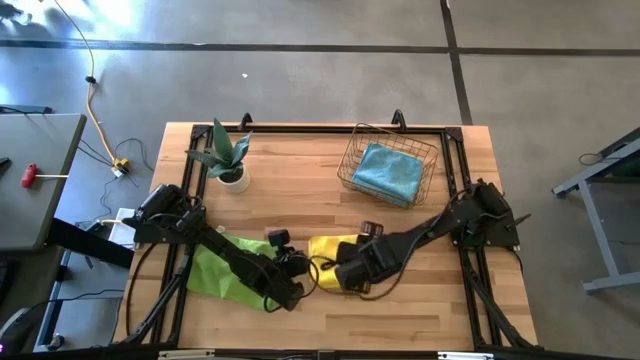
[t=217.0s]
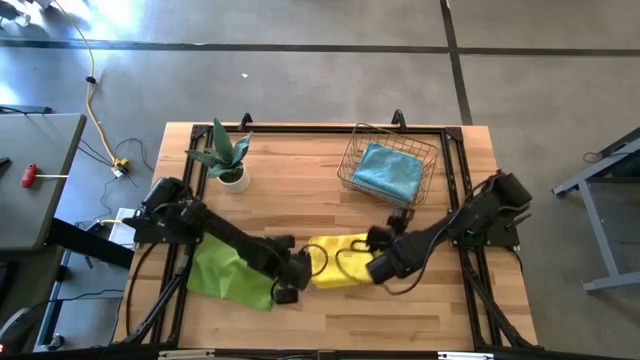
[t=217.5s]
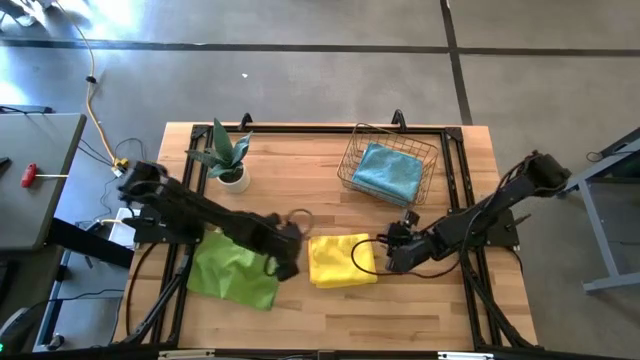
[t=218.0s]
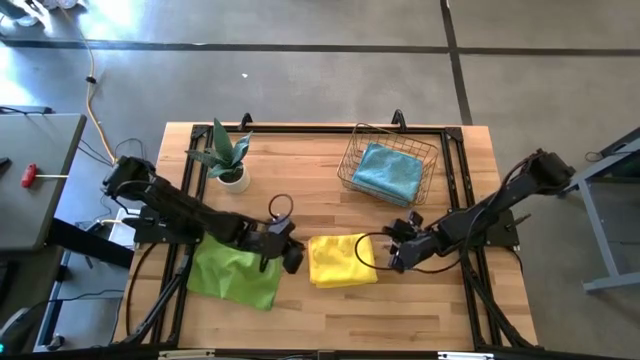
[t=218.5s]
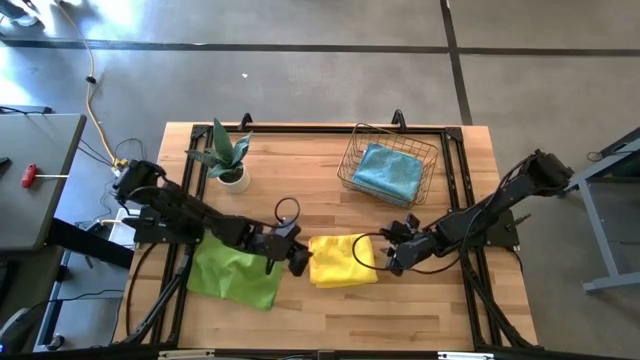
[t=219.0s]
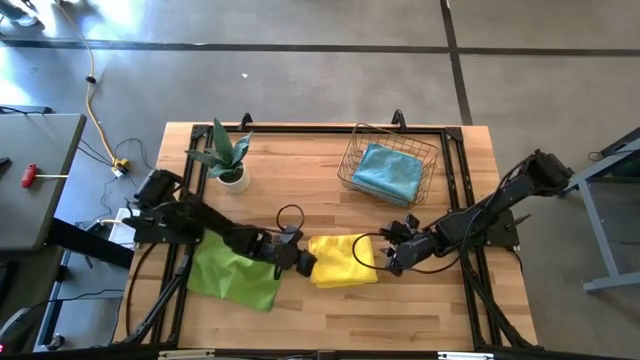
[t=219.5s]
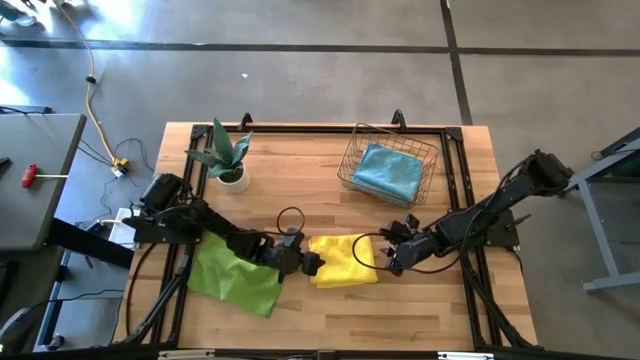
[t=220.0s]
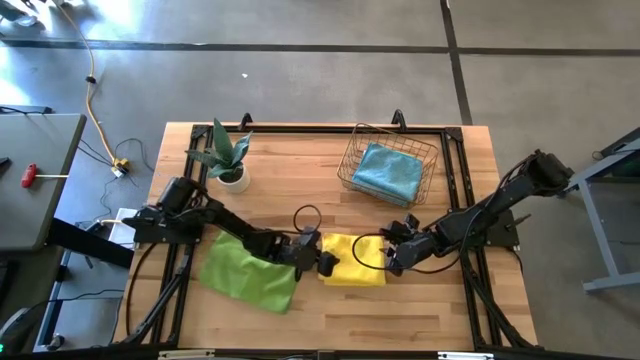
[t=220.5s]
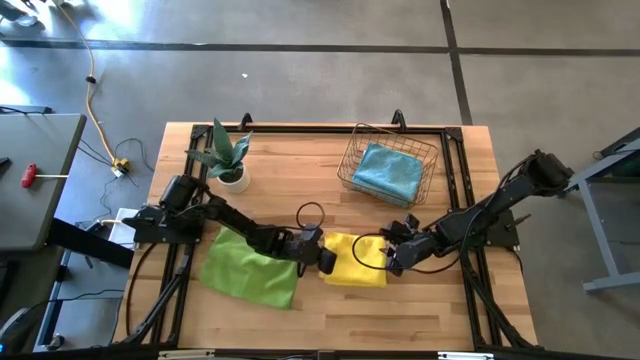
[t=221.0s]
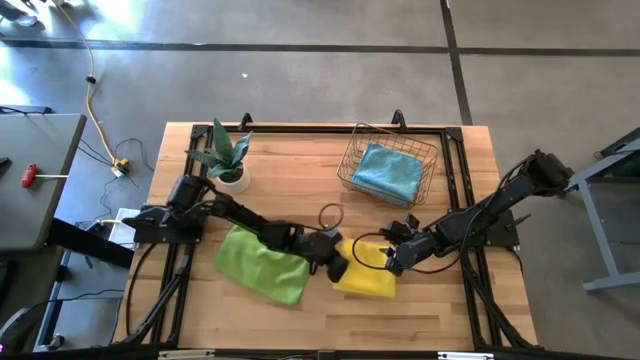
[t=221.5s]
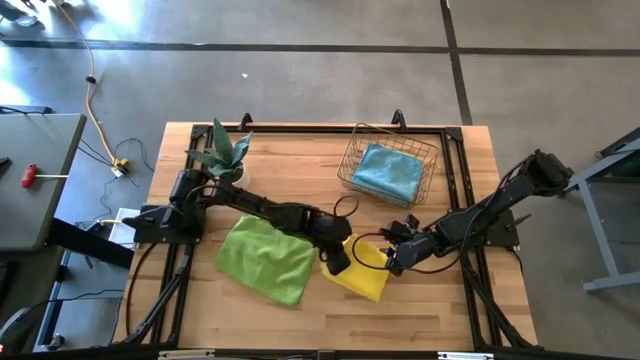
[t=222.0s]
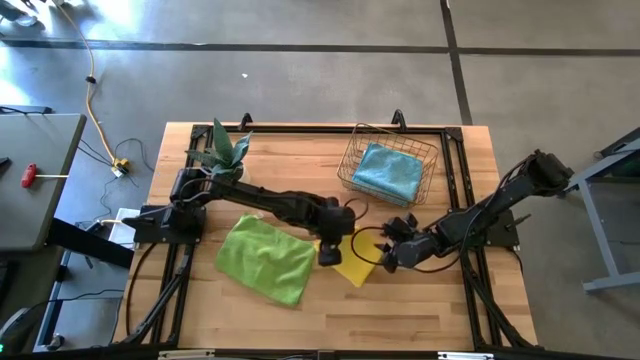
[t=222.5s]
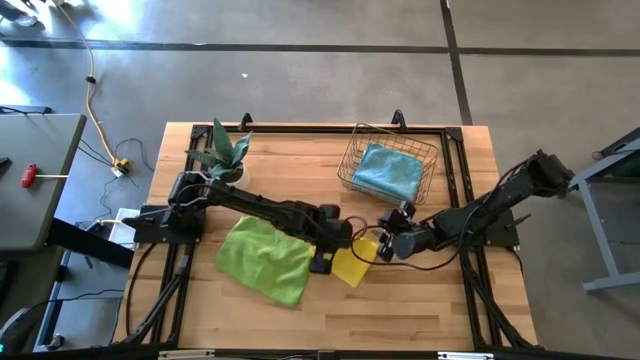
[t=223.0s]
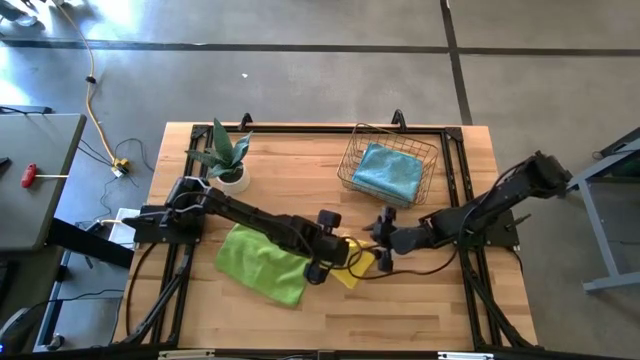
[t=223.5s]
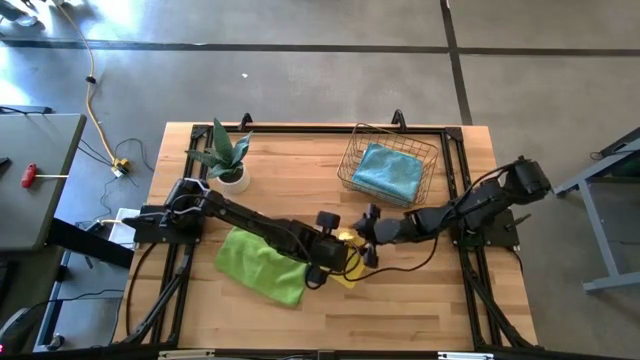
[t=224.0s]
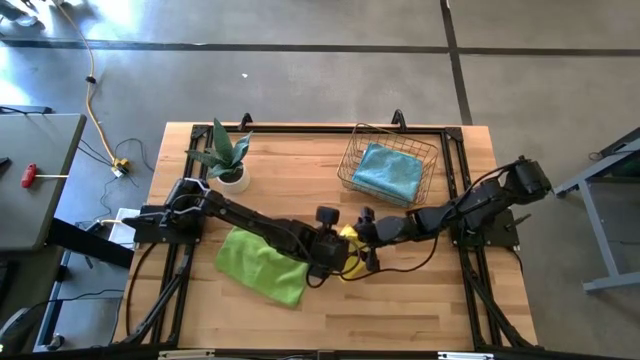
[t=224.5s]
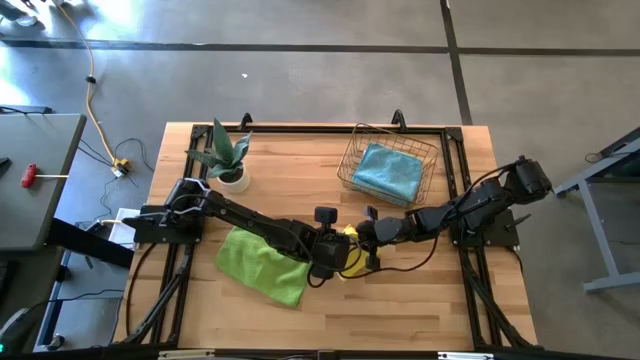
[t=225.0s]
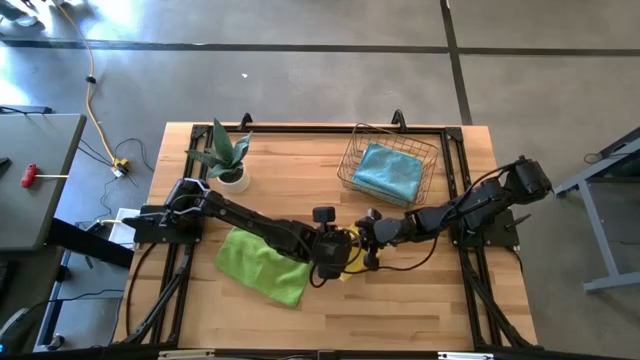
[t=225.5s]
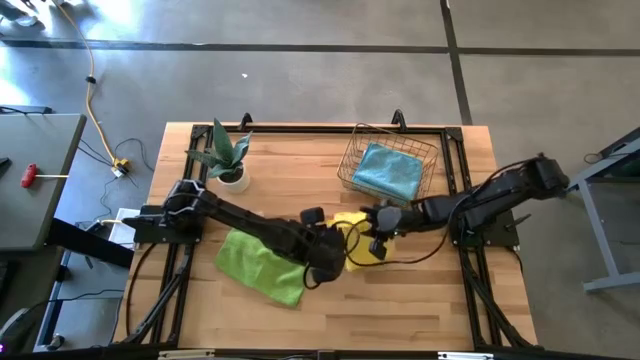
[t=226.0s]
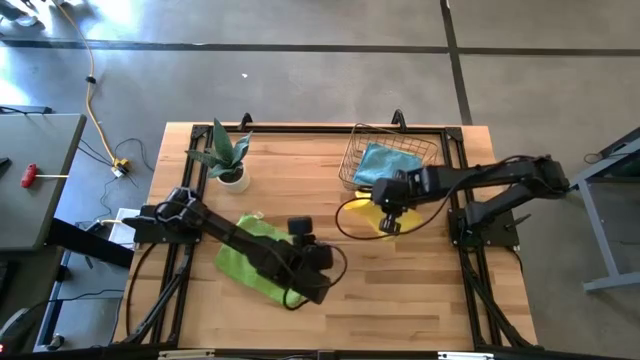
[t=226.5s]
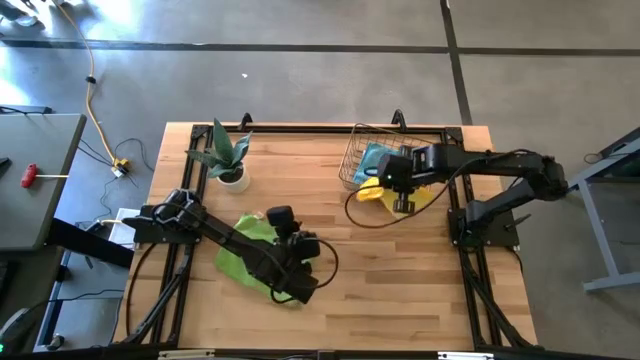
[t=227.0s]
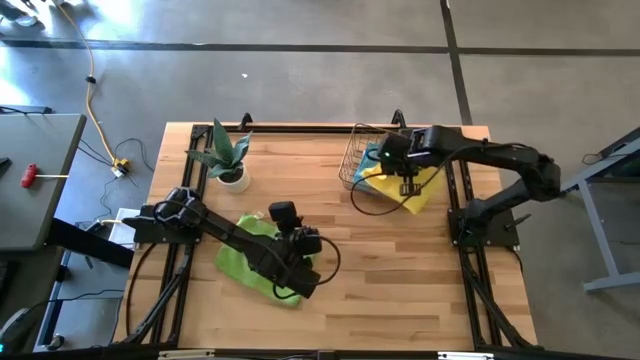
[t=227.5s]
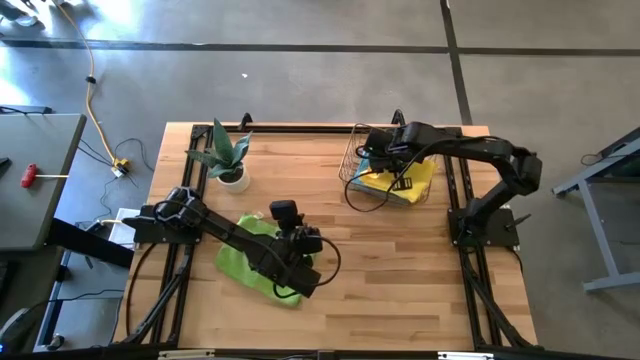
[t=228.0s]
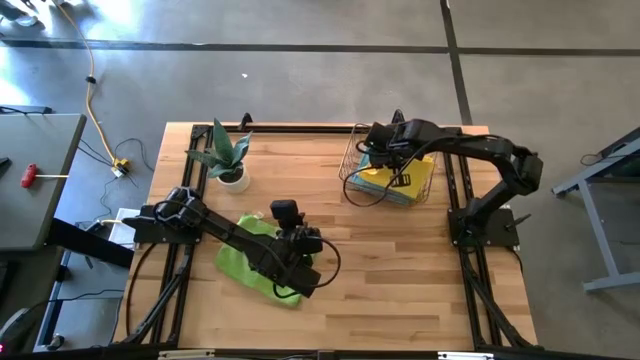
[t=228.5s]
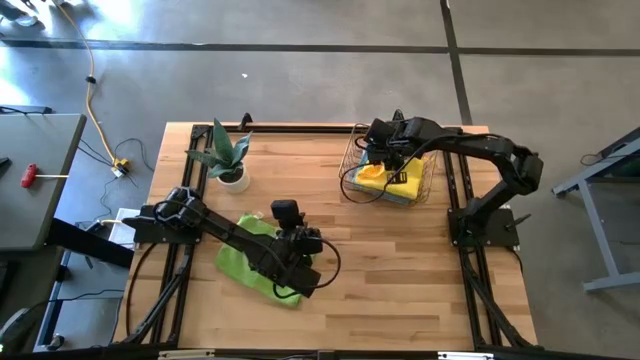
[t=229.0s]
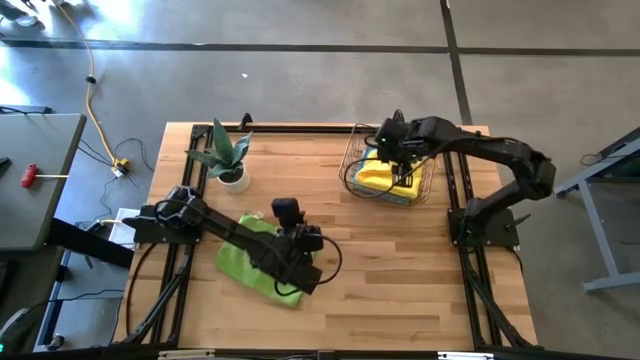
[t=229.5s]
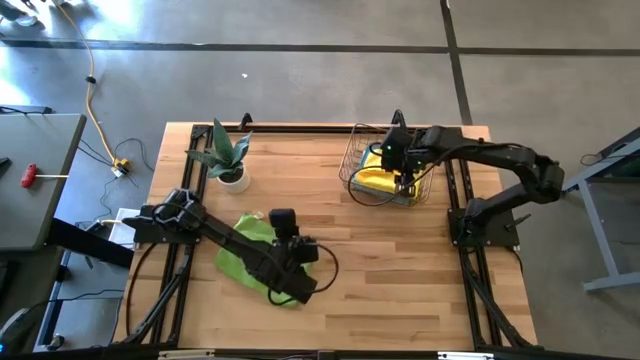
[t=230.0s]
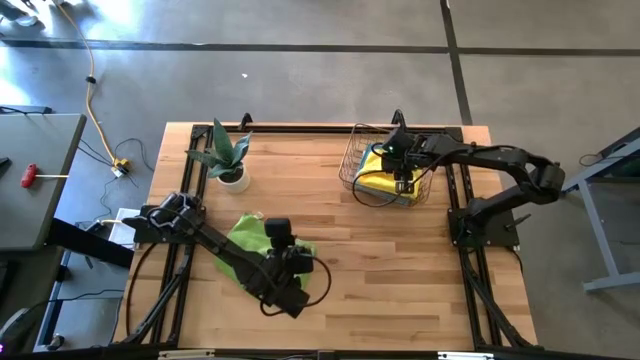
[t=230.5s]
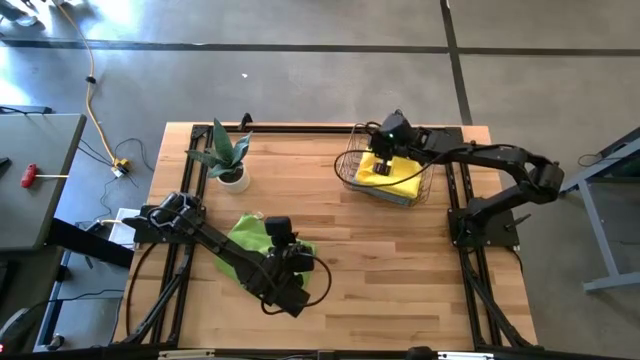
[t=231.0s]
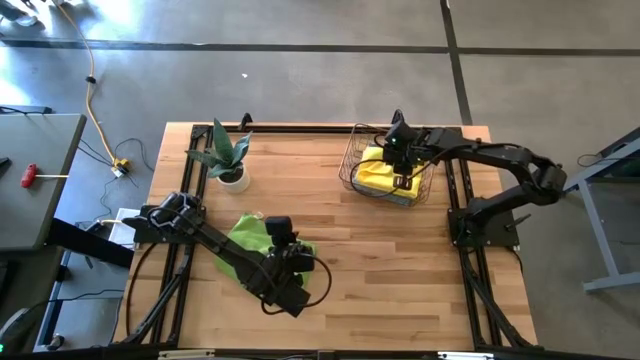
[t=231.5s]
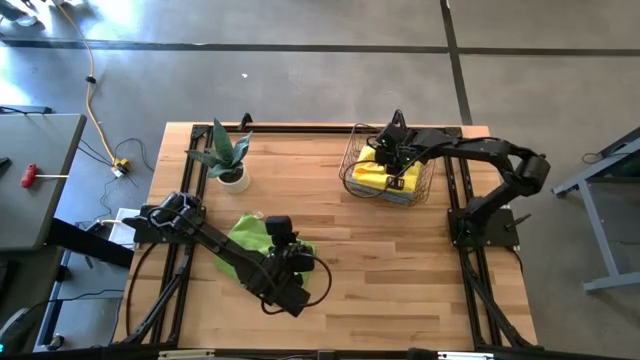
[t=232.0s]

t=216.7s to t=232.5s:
Task: Fold microfiber towels
Put the yellow microfiber towel into the wire basket

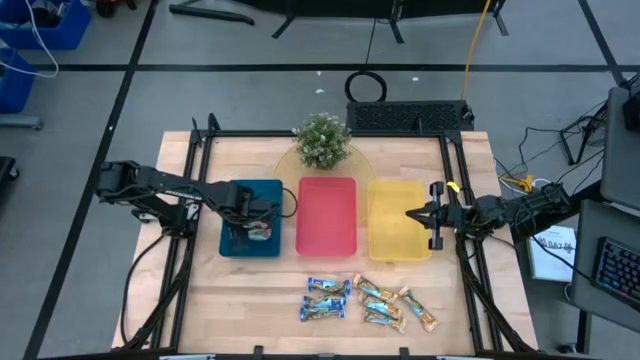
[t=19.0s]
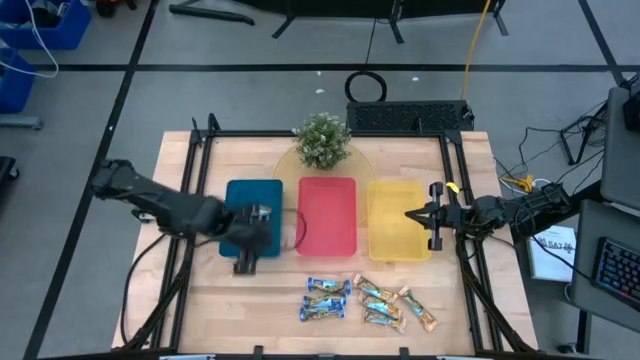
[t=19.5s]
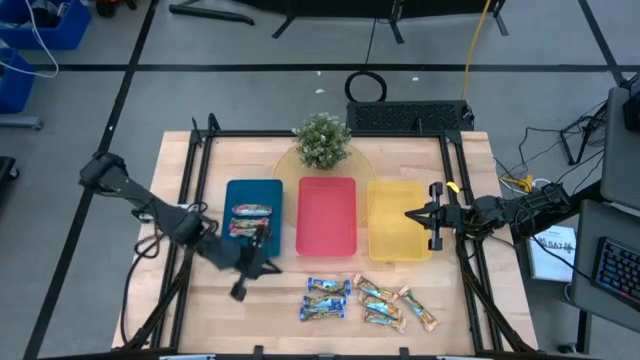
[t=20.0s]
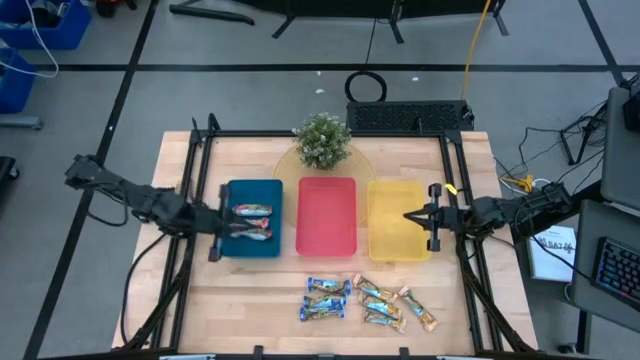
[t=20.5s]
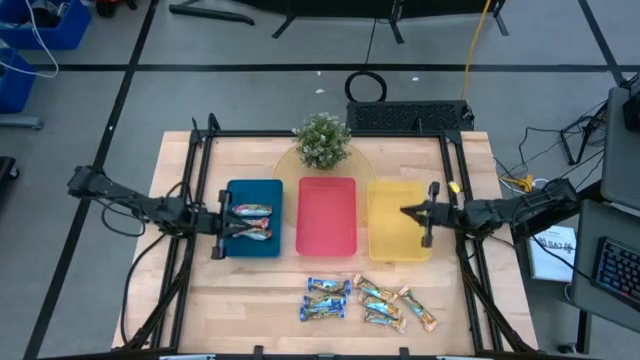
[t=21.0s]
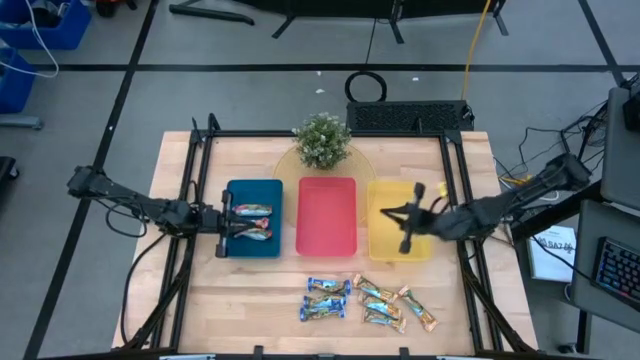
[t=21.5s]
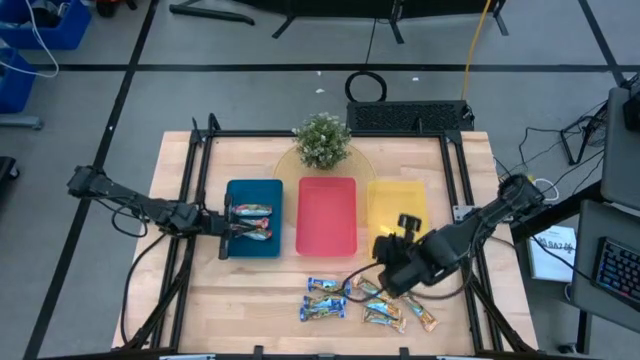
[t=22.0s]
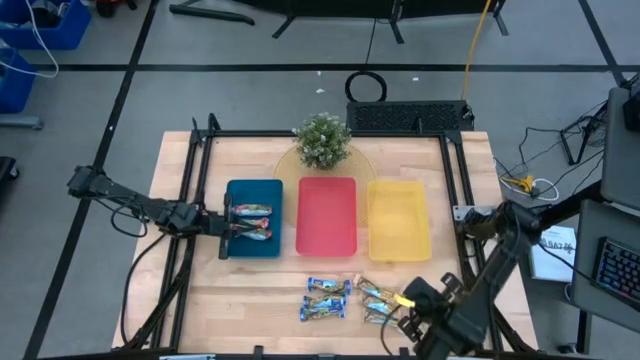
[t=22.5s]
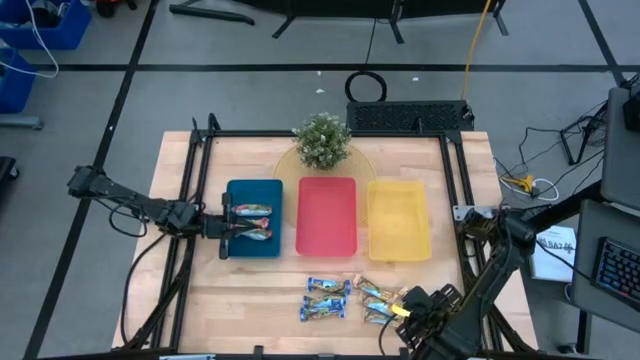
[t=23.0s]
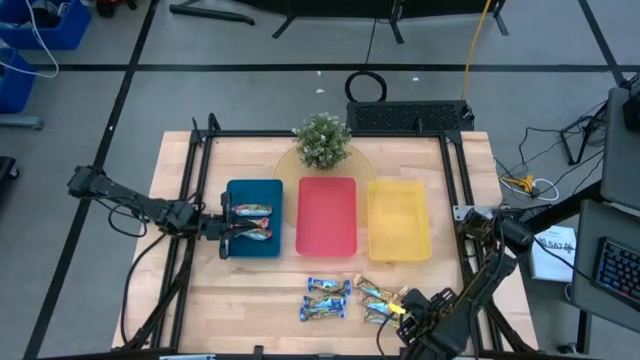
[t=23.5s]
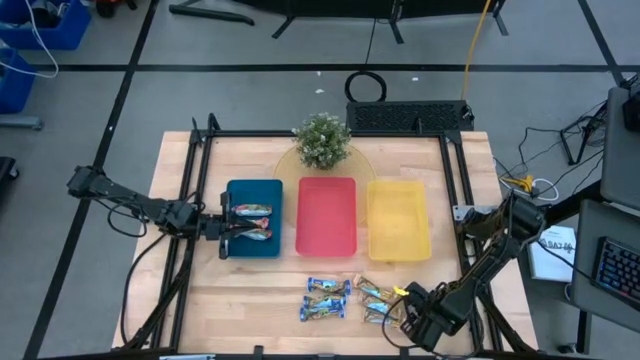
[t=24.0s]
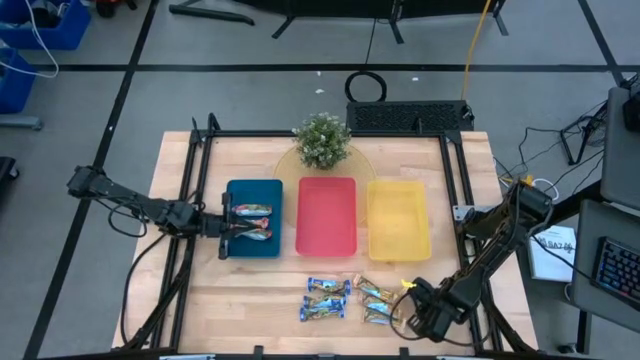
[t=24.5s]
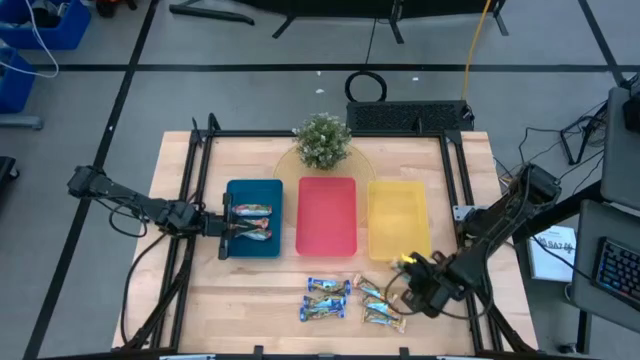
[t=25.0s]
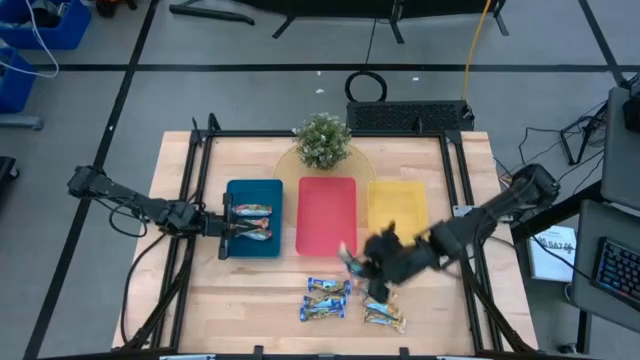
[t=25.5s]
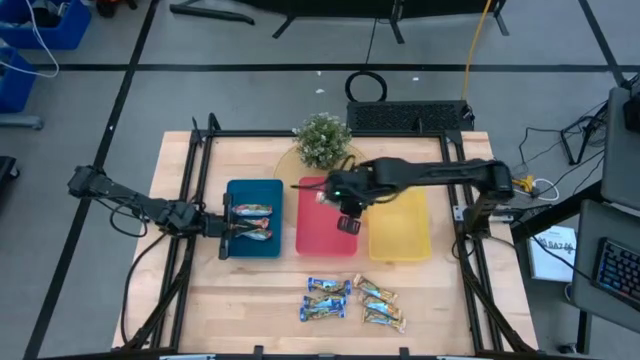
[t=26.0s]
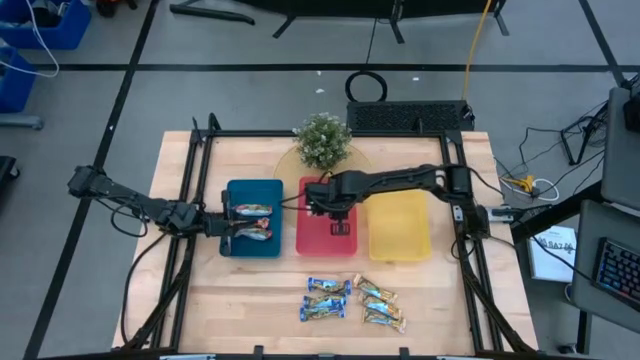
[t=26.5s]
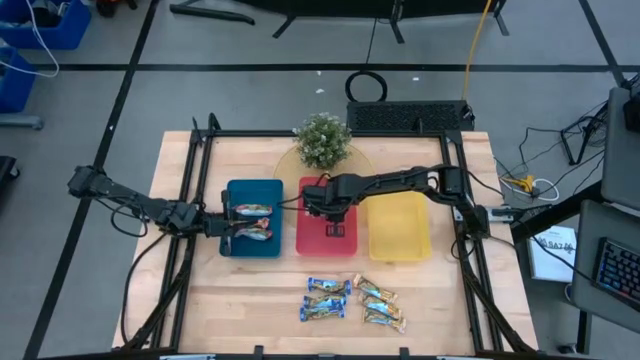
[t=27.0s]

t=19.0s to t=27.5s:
Task: Pick and place Granola Bars by type
Put the right yellow granola bar into the red bin
